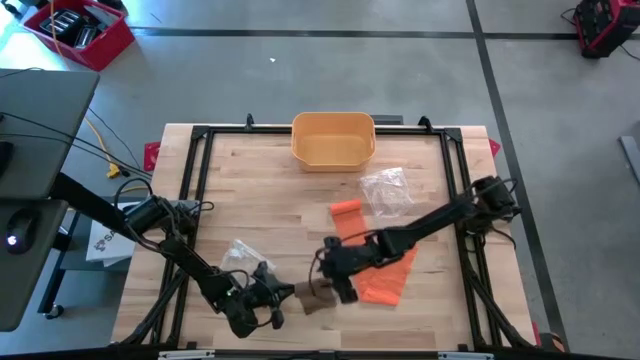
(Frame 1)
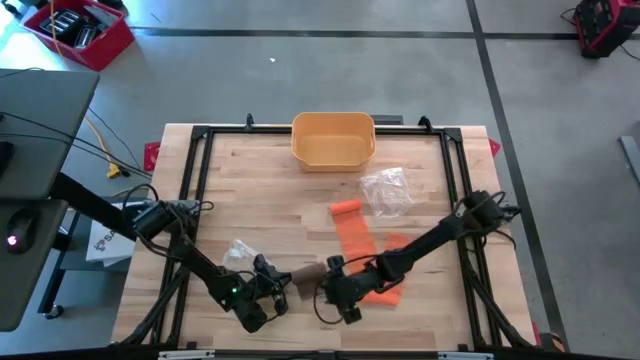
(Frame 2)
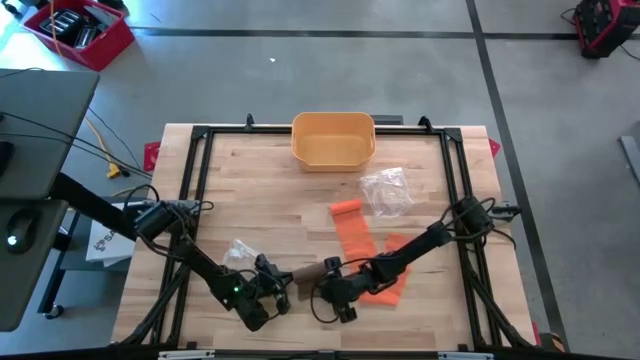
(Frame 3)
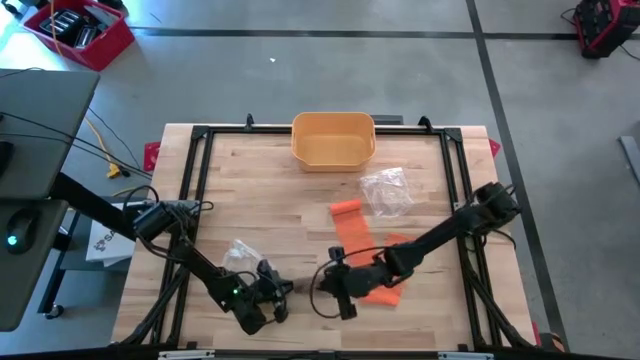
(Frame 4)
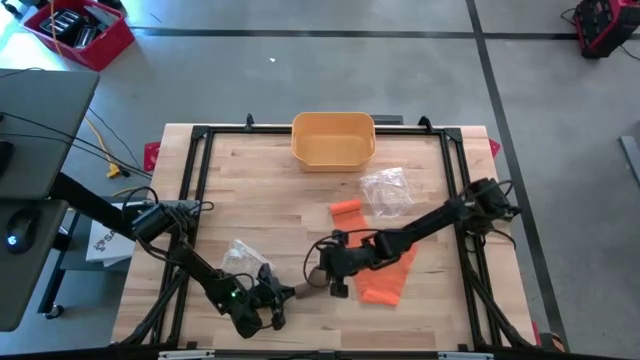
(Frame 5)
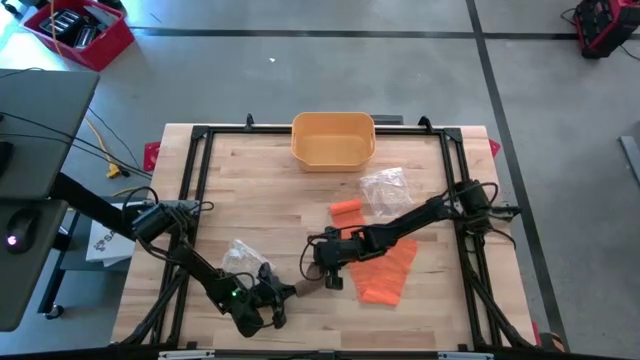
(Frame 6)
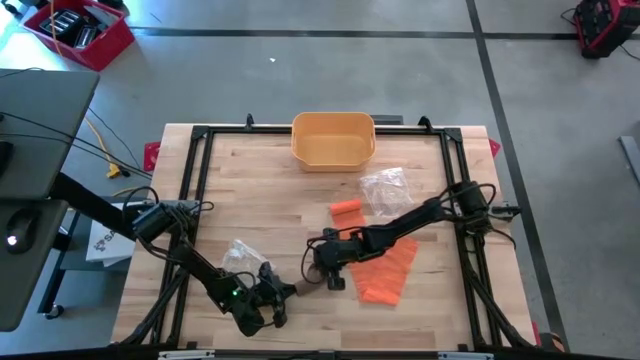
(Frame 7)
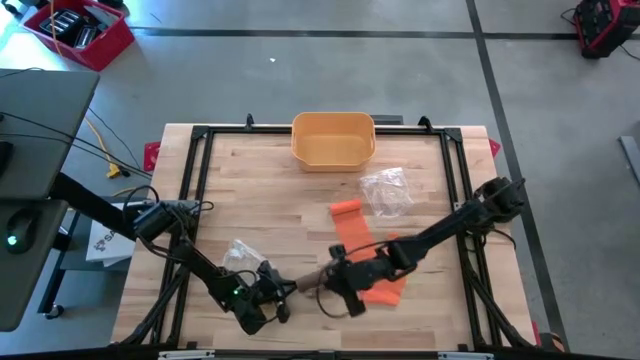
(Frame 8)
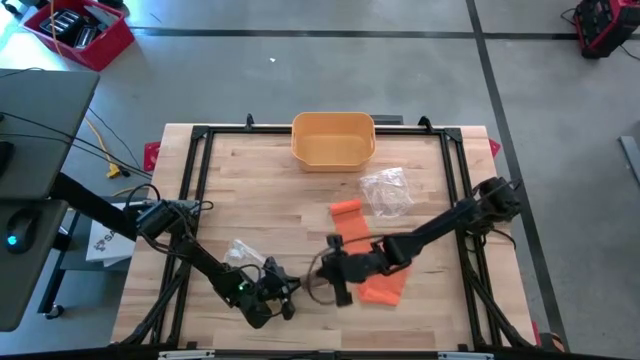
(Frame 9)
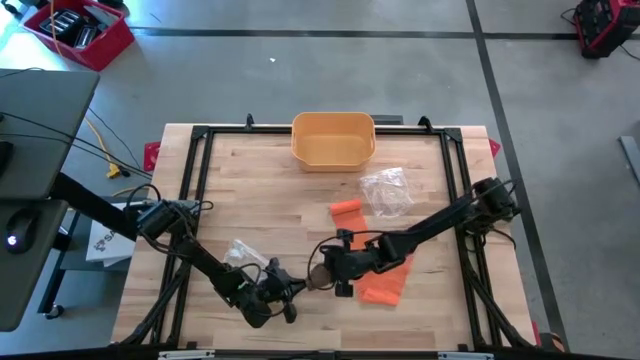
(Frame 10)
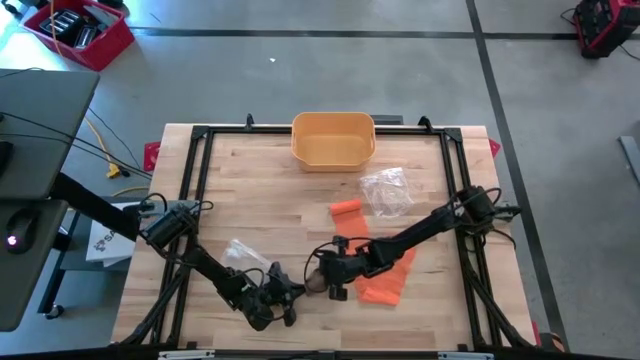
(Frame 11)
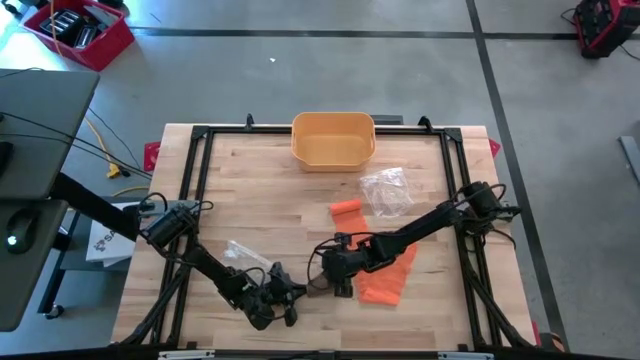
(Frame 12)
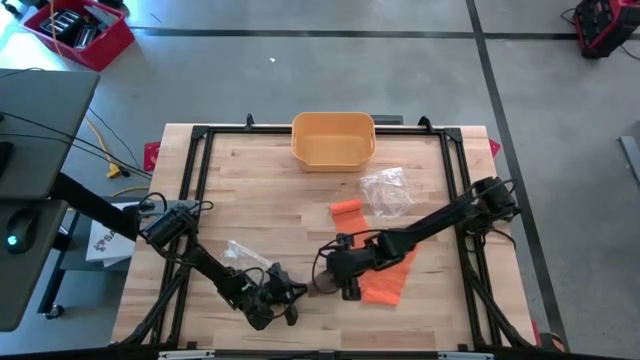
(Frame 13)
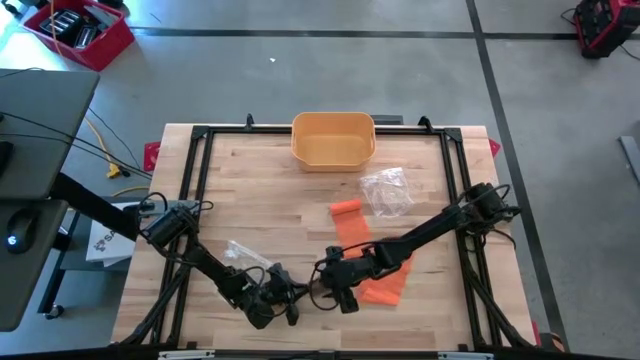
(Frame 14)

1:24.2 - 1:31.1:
Task: Roll bandage
Roll the brown bandage

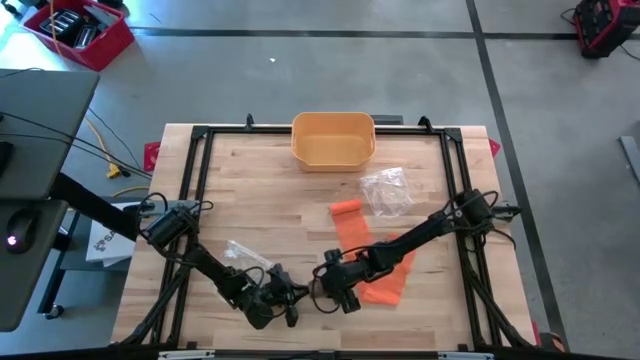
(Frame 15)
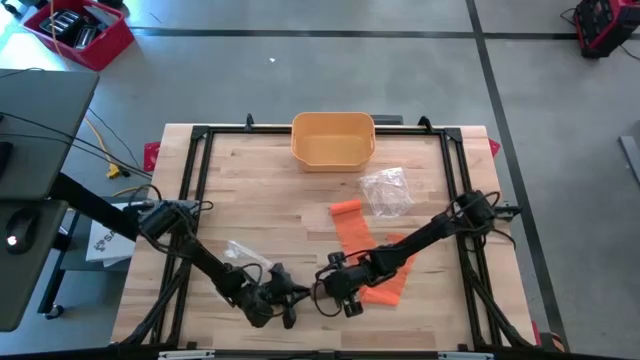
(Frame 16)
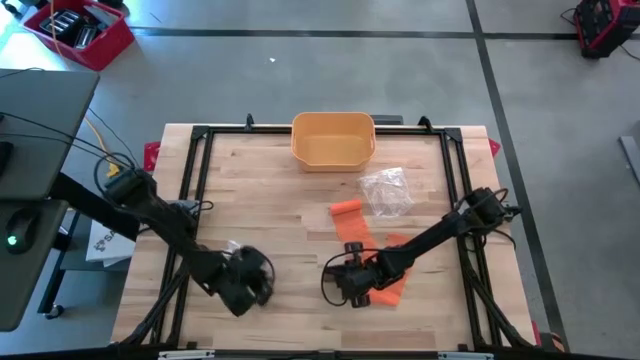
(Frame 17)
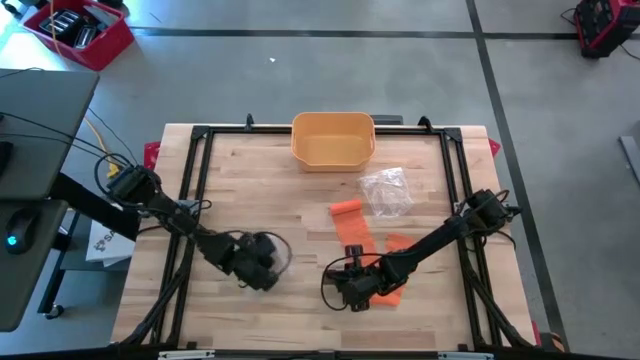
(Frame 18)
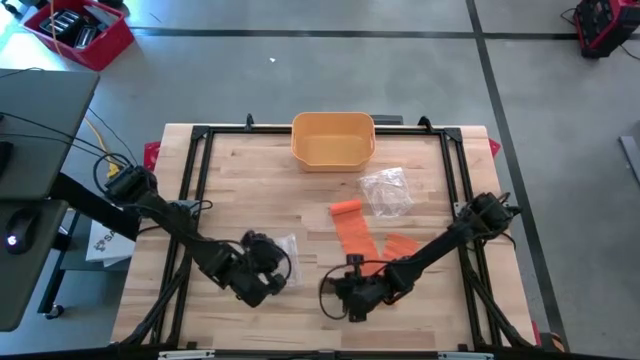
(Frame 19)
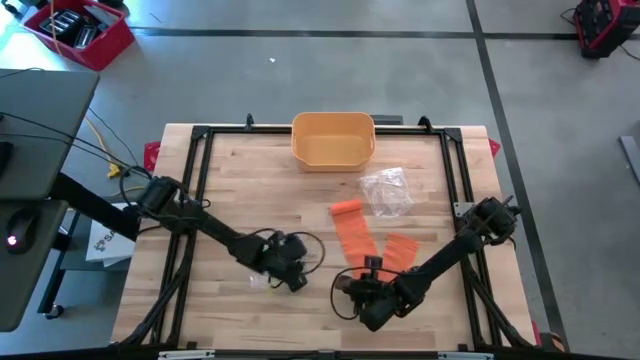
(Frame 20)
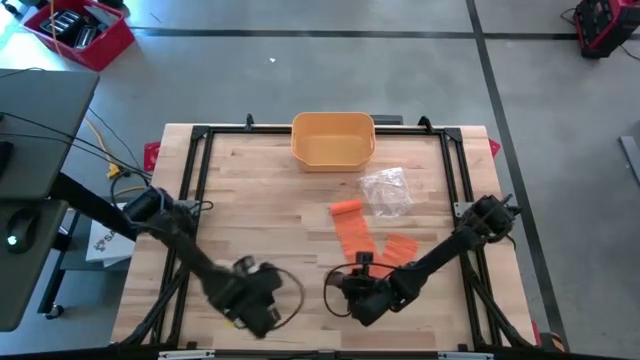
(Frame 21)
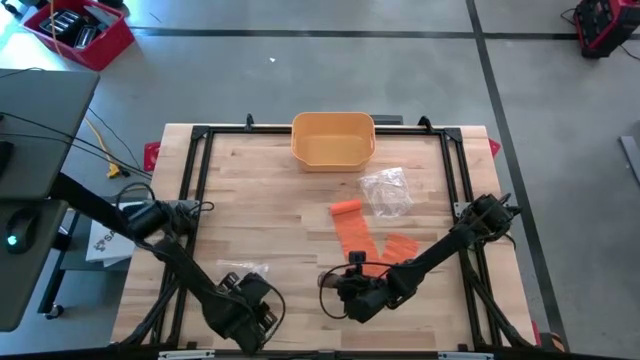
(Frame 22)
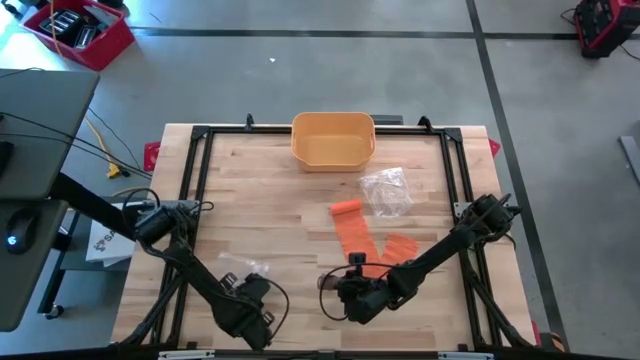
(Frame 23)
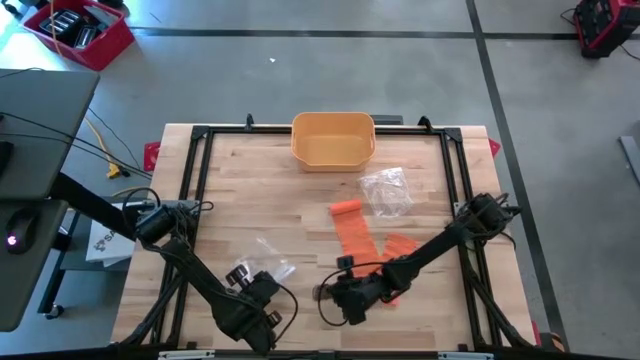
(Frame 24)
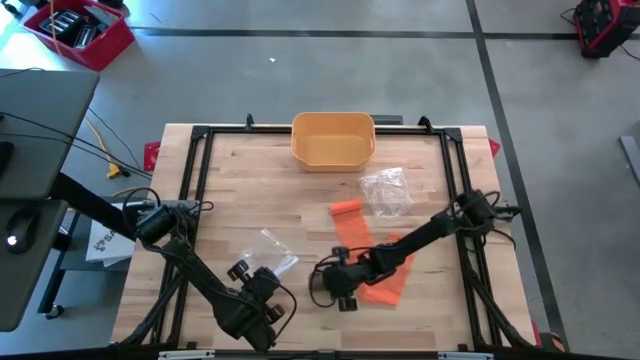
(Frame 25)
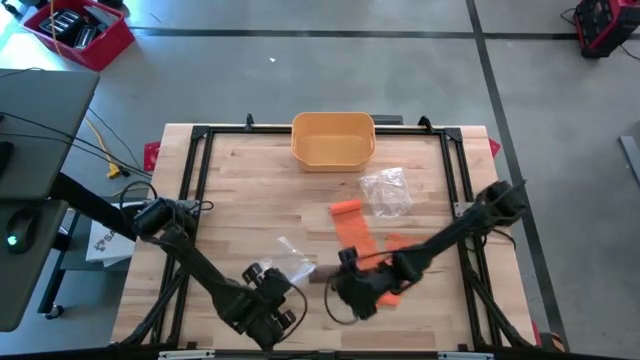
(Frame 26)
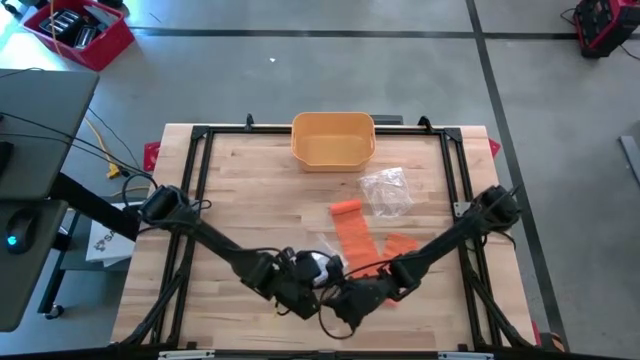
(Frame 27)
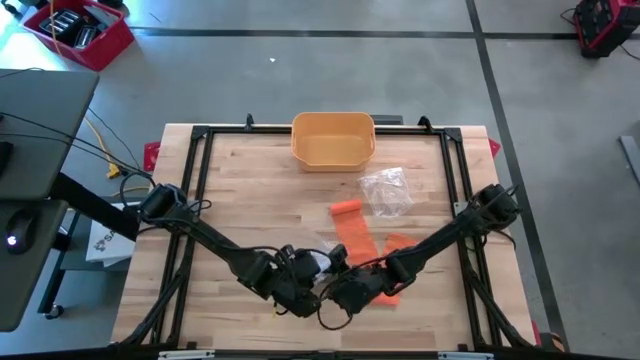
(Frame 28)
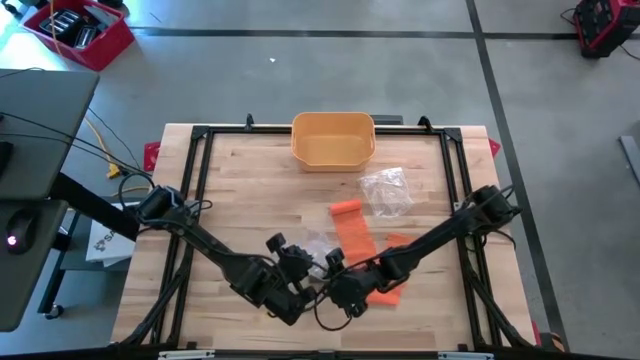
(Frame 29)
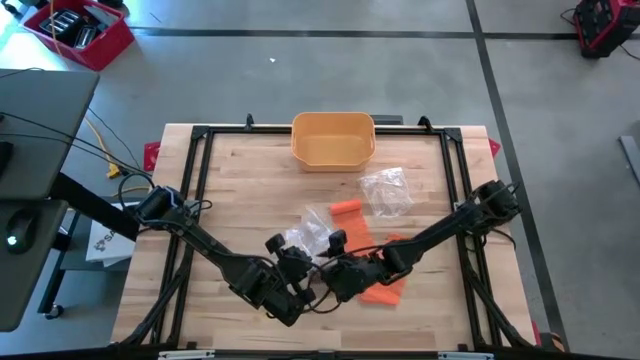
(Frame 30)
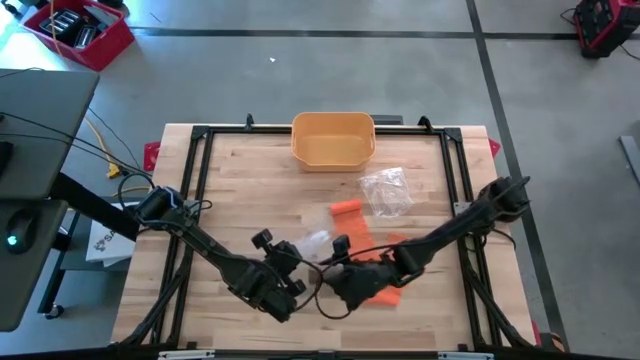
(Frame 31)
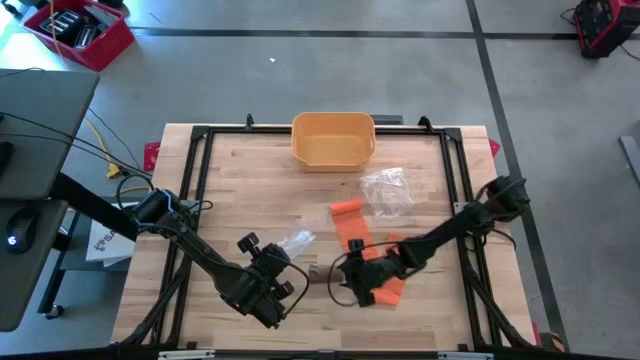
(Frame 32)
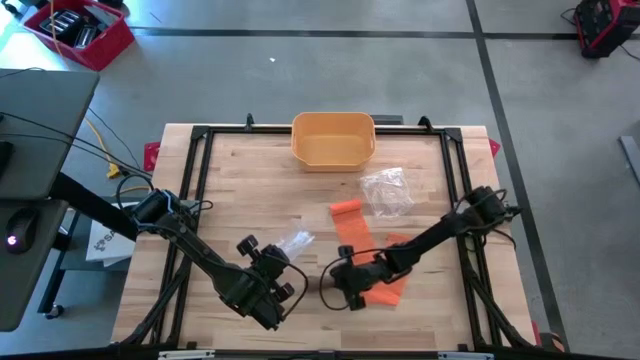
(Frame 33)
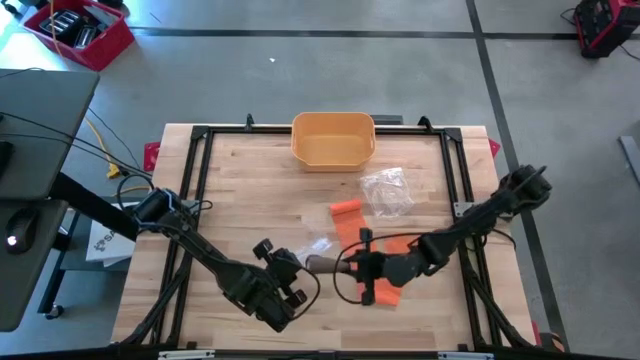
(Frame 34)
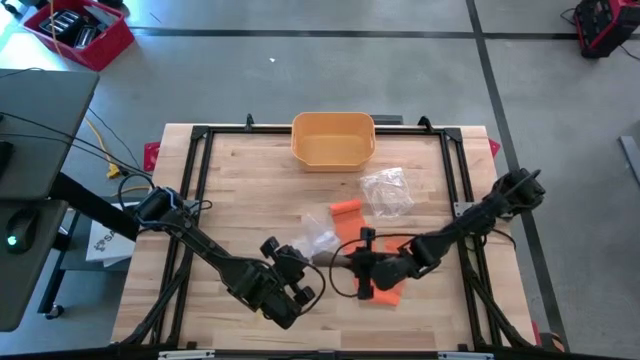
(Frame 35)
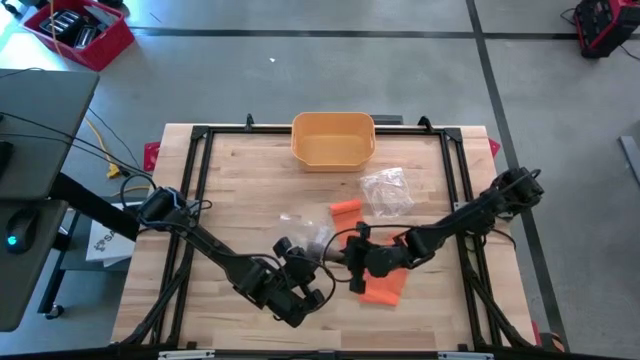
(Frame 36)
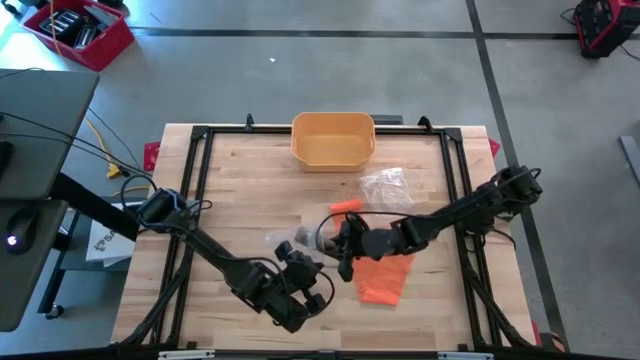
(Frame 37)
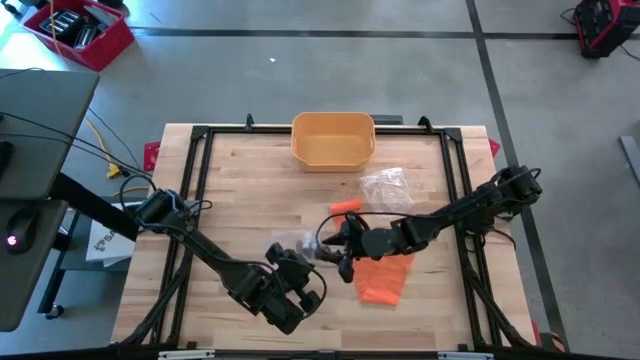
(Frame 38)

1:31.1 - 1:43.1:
Put the rolled brown bandage into the bottom transparent zip
